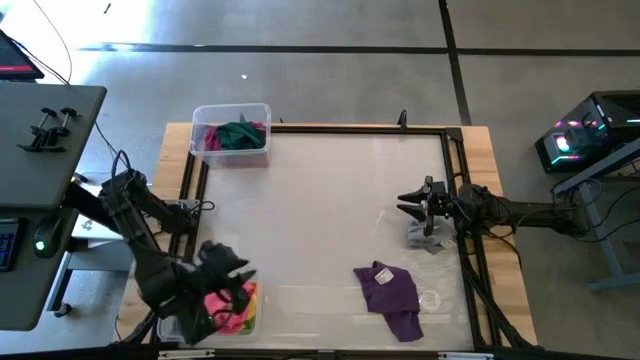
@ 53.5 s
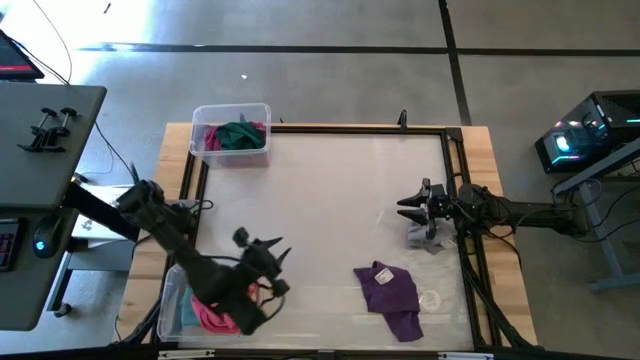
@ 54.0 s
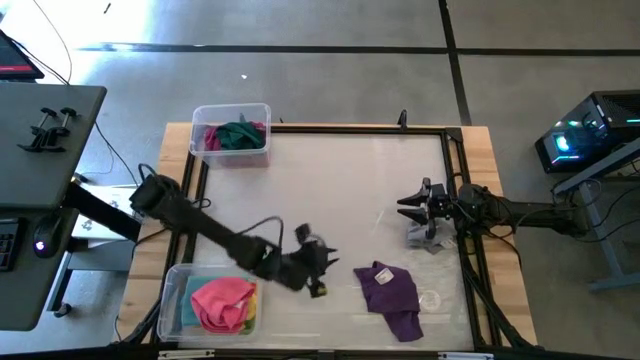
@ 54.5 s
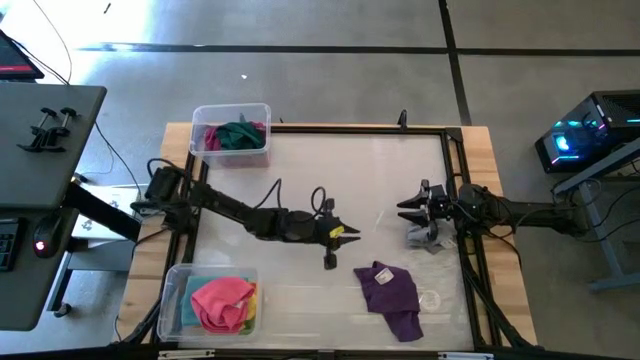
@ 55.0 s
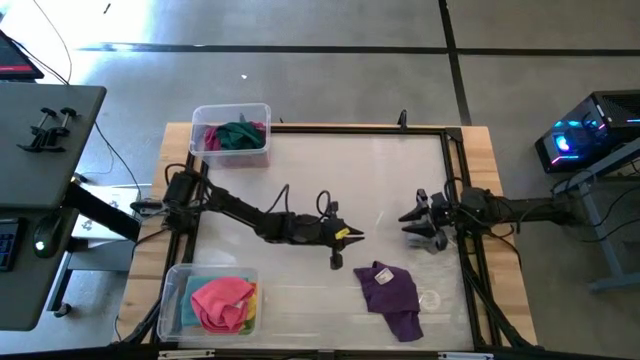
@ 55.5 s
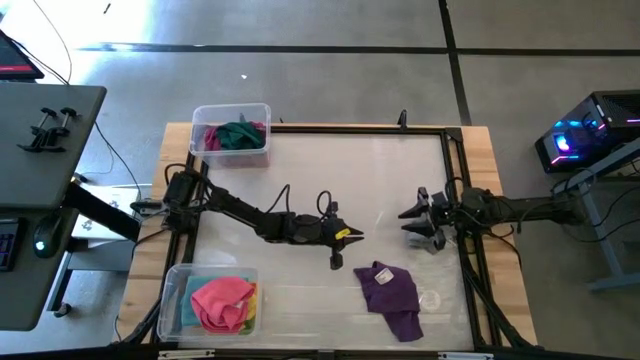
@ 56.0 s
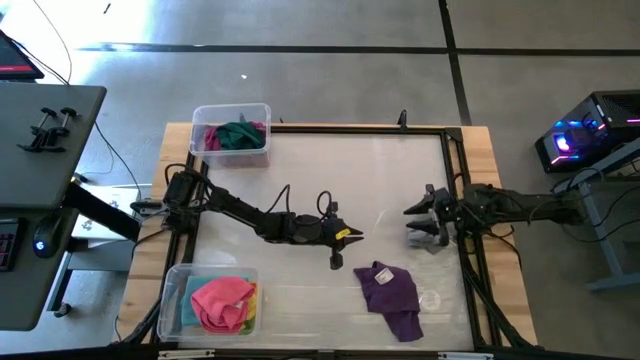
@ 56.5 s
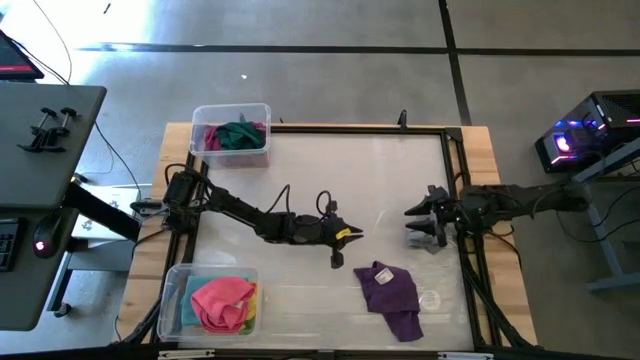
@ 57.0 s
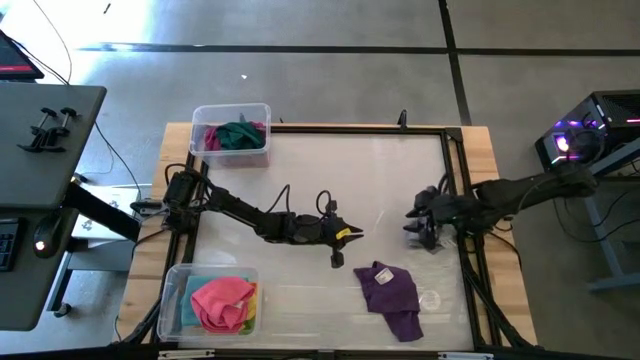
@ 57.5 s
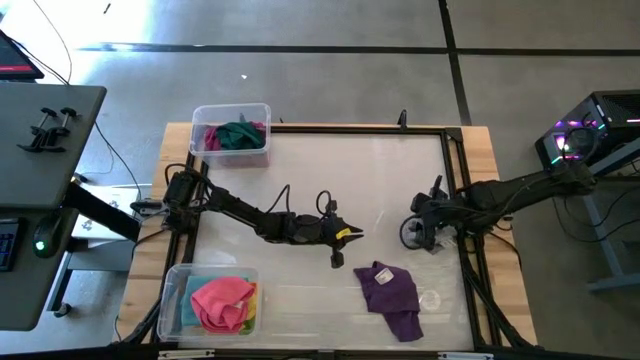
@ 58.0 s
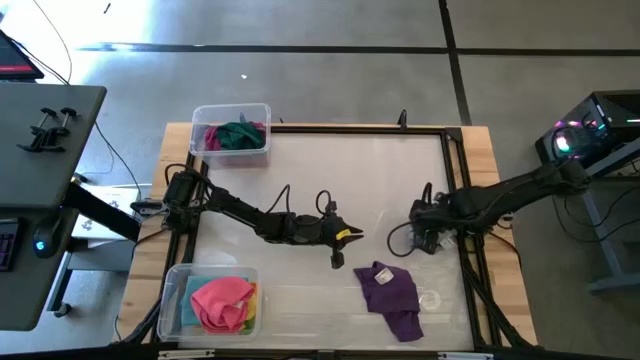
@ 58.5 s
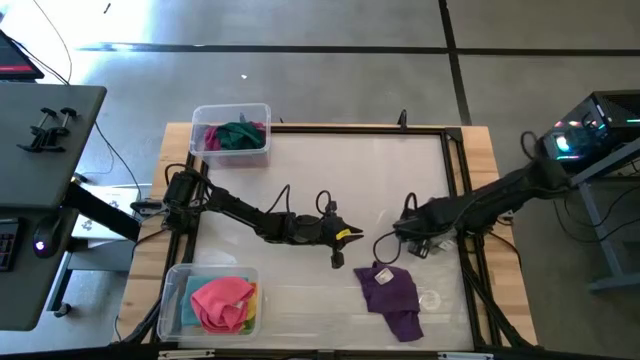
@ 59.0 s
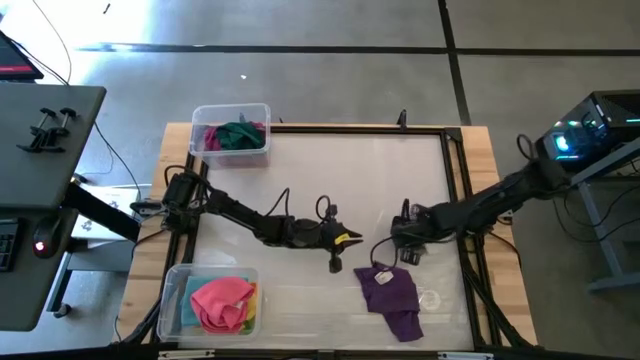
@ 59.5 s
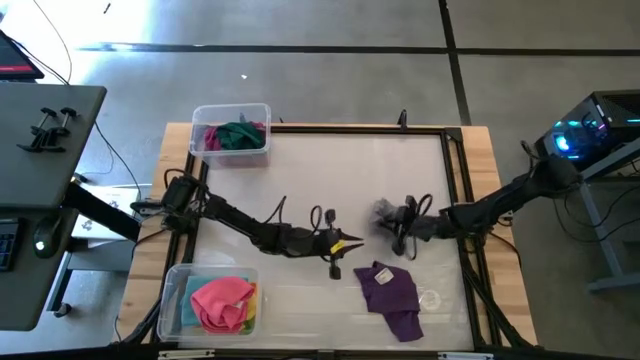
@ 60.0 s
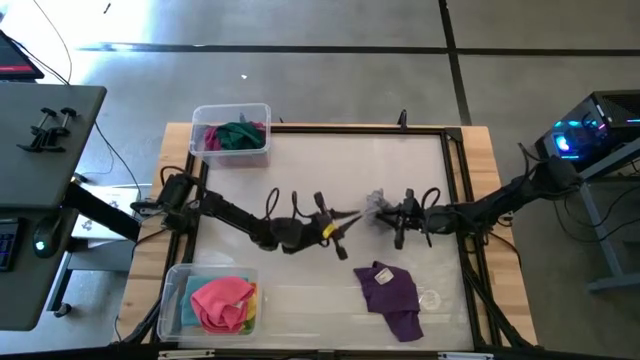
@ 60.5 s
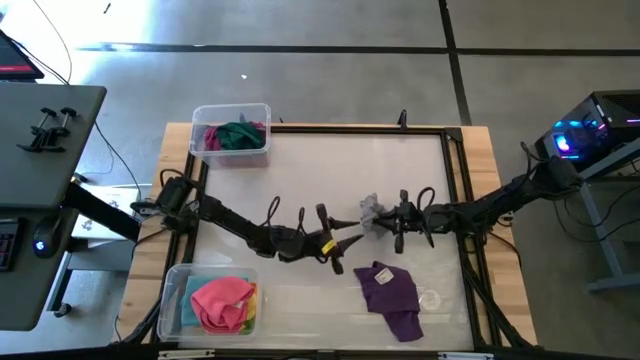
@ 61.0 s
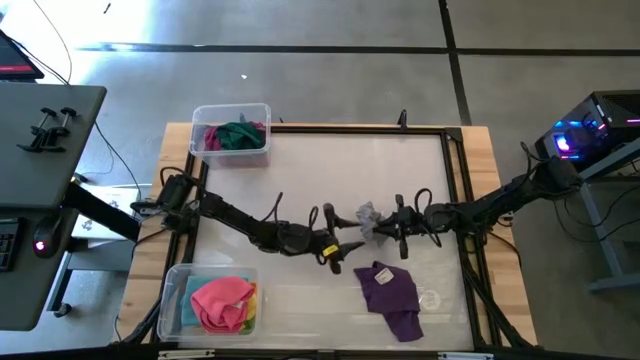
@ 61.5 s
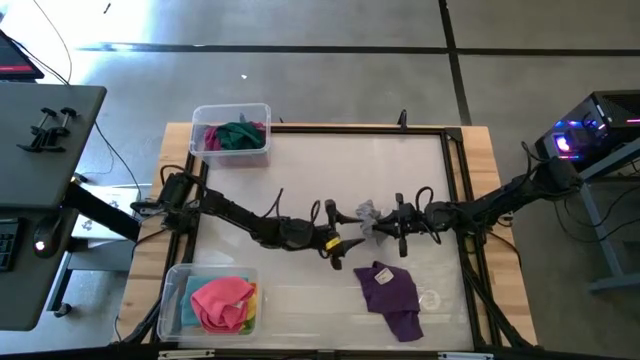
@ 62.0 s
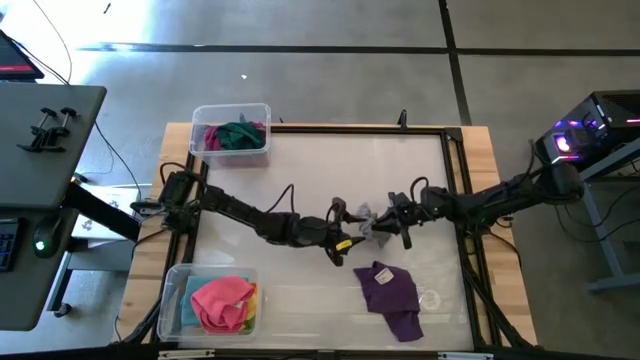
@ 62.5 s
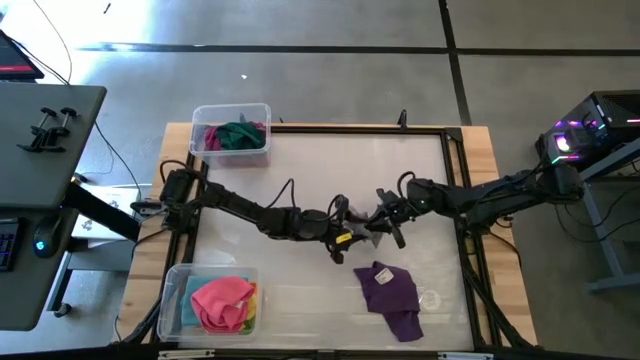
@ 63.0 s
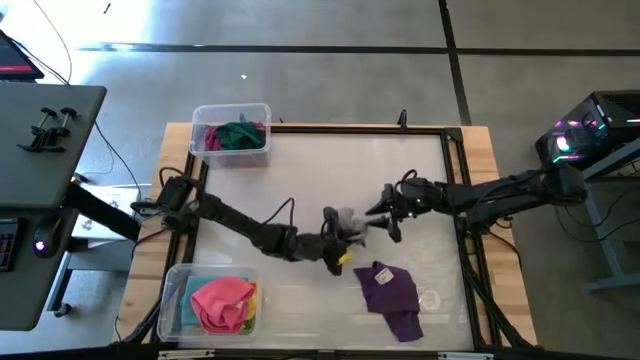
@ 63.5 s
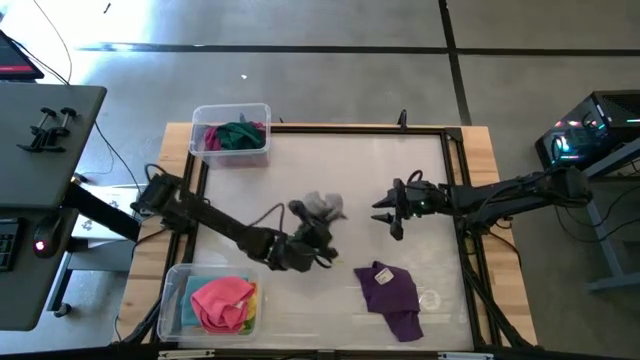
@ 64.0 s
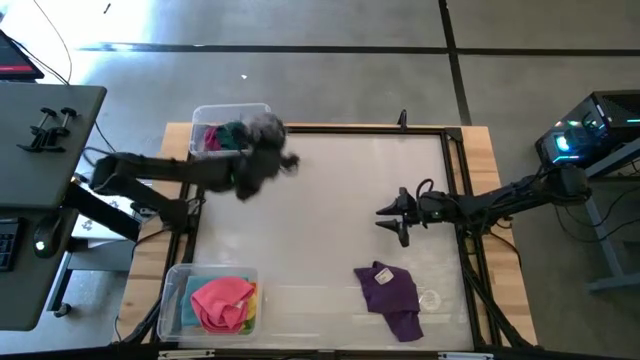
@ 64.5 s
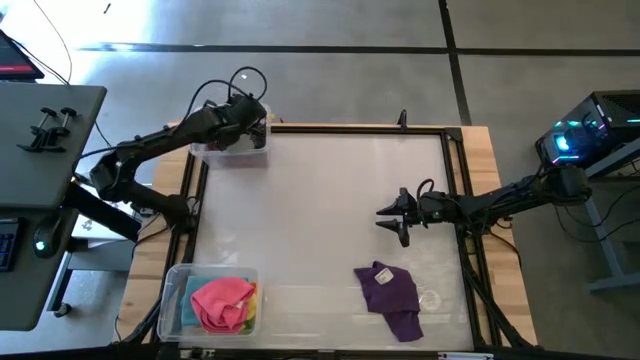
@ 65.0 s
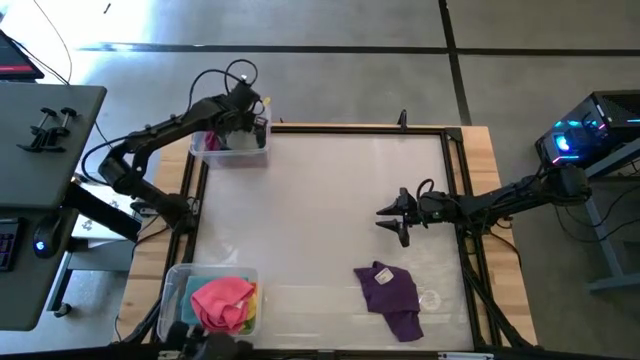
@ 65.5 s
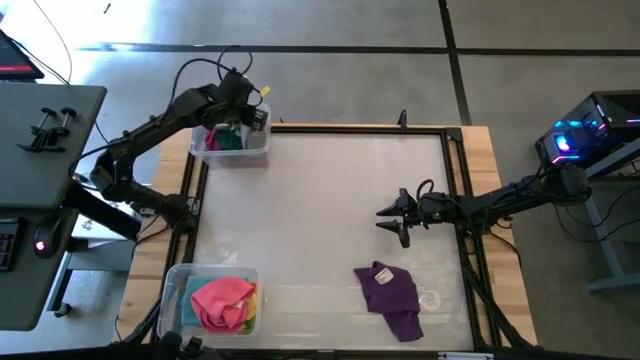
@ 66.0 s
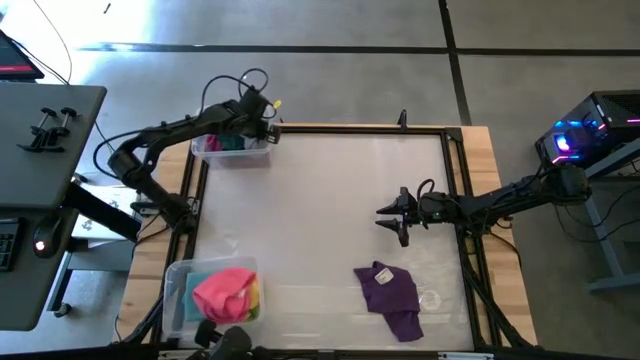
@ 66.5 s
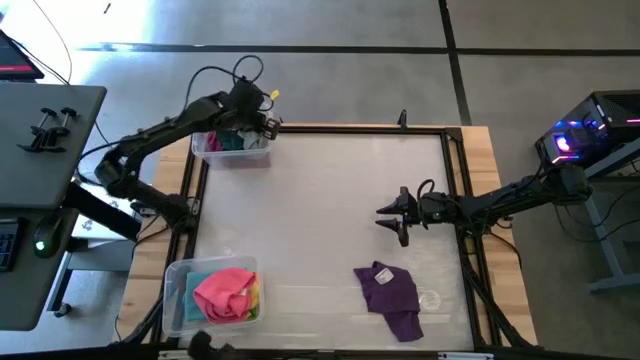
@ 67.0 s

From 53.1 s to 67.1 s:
Task: Sort towels by color in basket
Put the gray towel into the top transparent bin

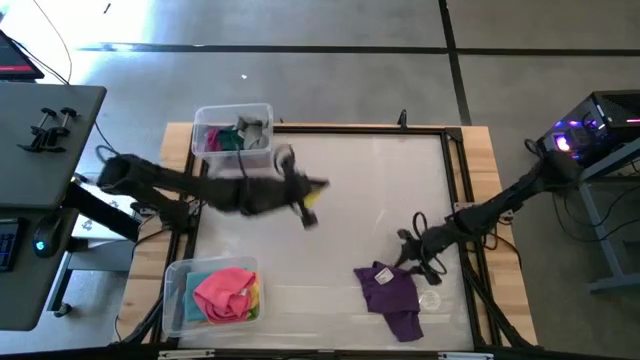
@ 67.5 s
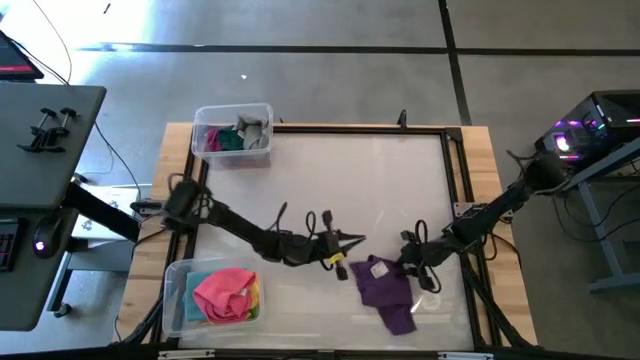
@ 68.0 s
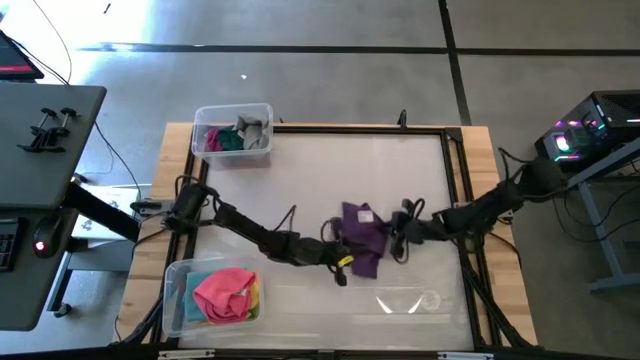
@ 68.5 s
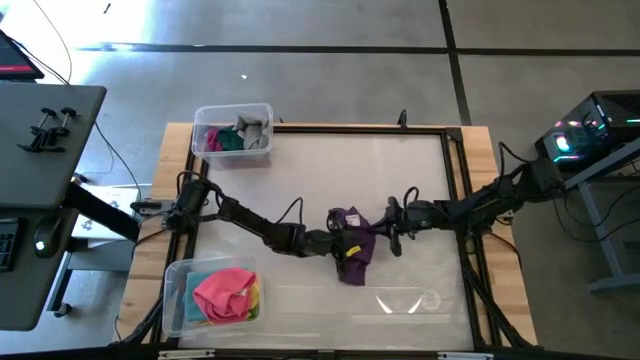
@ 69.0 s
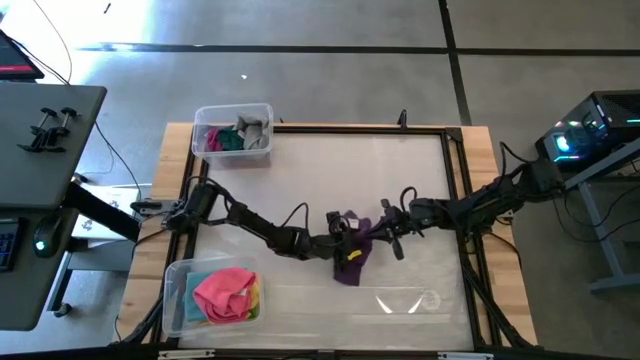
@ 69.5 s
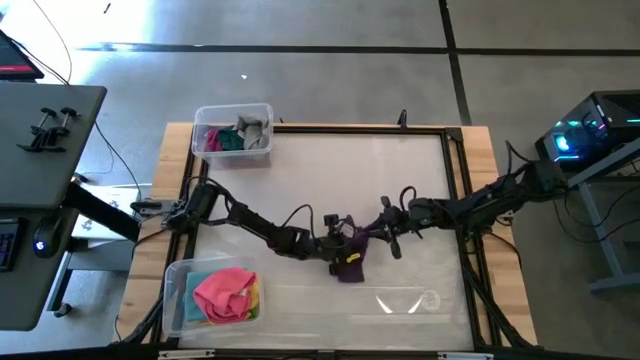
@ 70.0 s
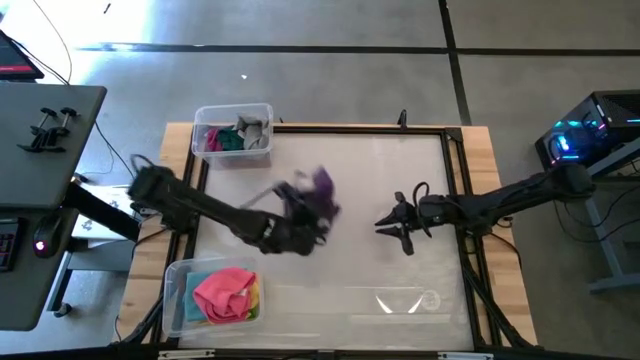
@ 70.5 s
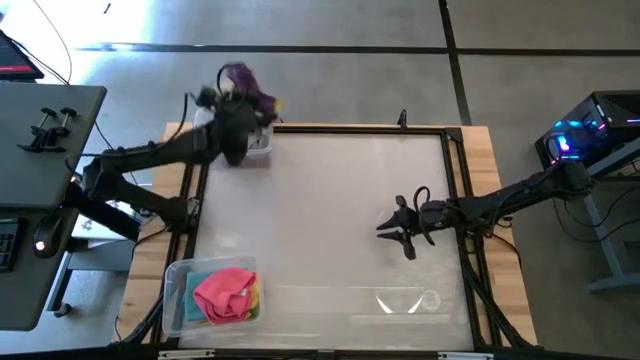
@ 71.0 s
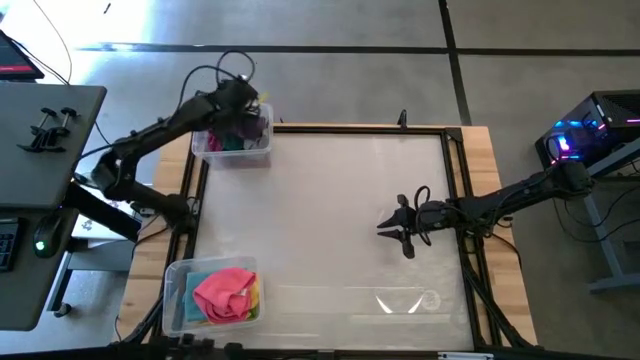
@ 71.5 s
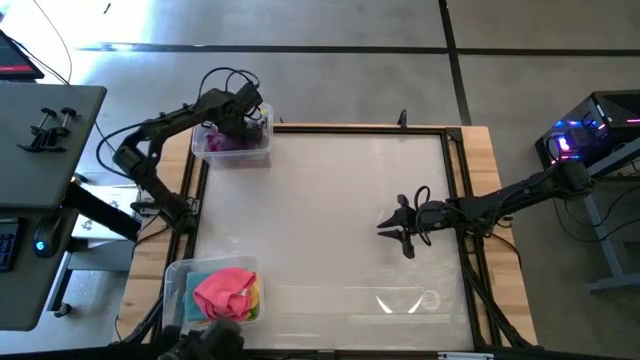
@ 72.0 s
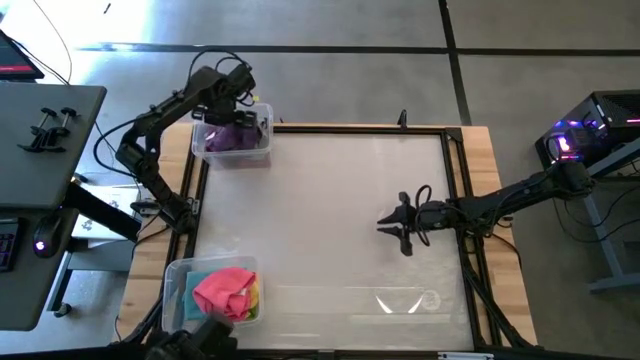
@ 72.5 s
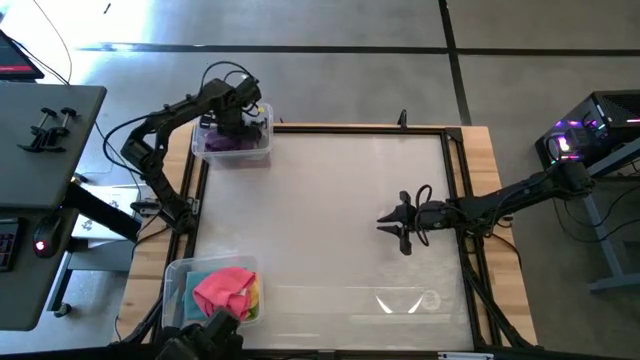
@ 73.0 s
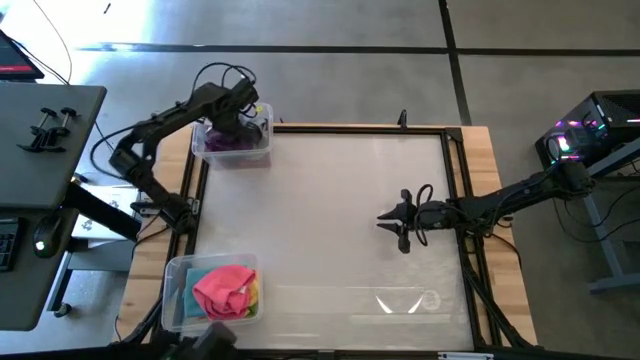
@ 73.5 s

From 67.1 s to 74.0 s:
Put the purple towel into the top transparent bin

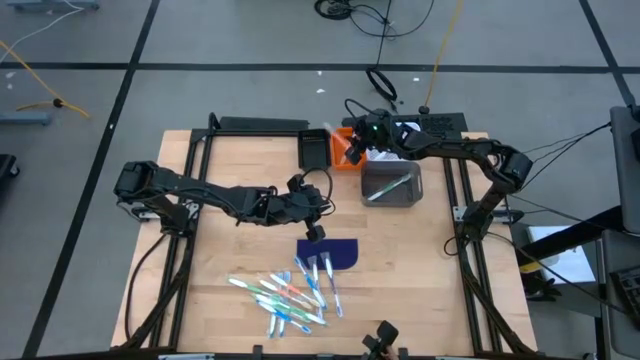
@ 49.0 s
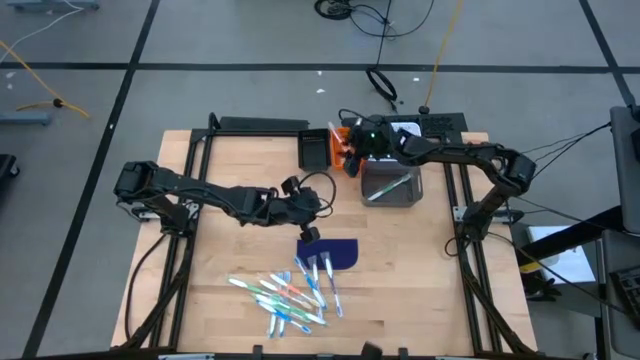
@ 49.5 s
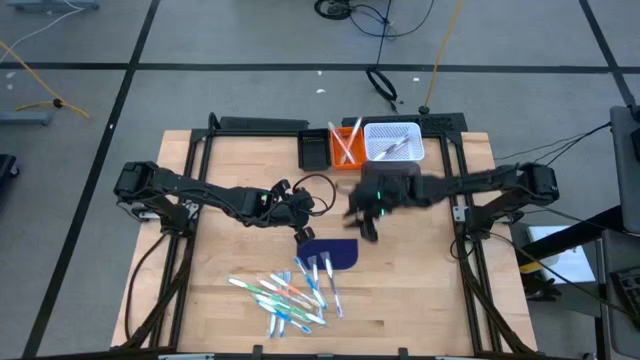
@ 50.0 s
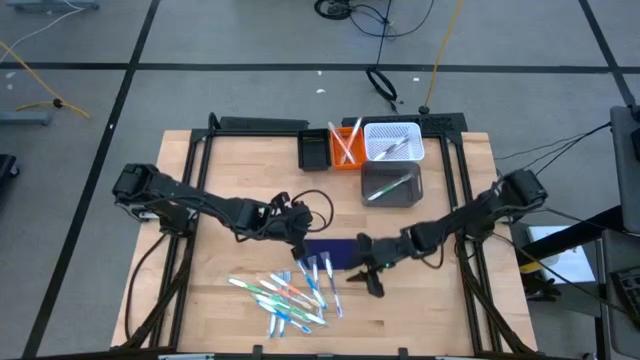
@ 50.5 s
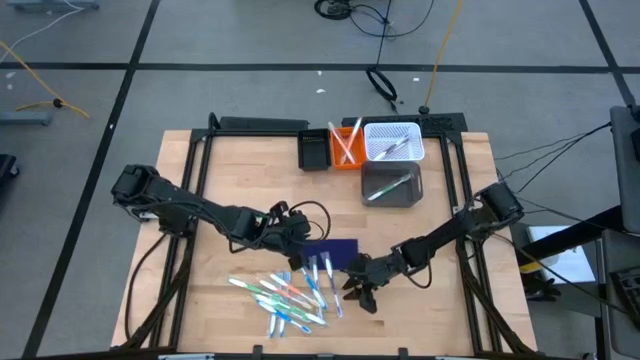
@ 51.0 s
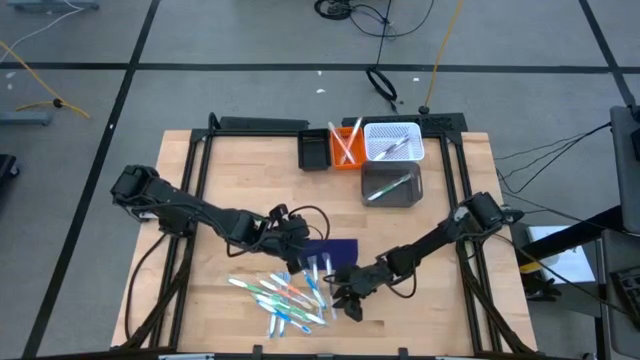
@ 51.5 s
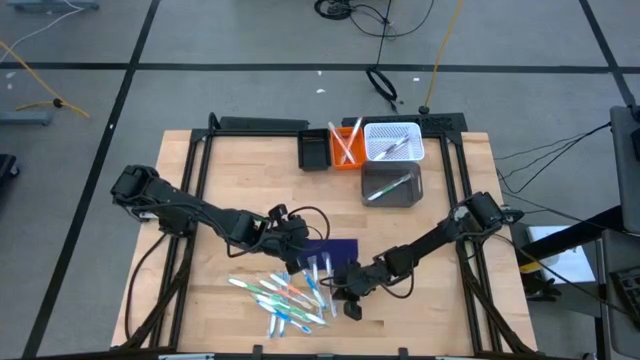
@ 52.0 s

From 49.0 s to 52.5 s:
Task: Pick & Place Toothbrushes
Put the purple toothbrush into the white bin
